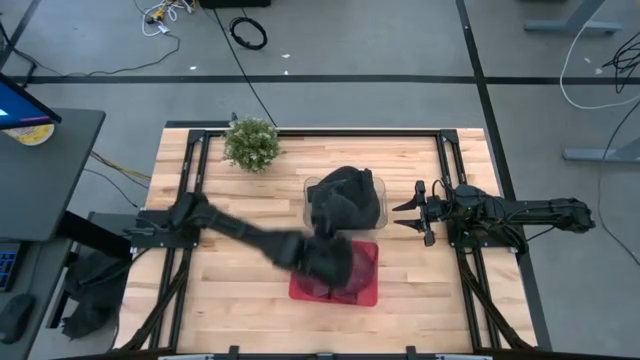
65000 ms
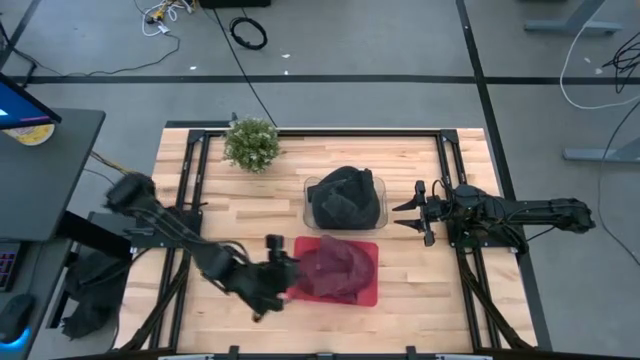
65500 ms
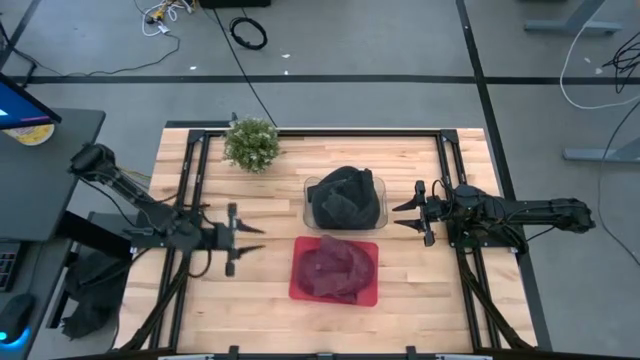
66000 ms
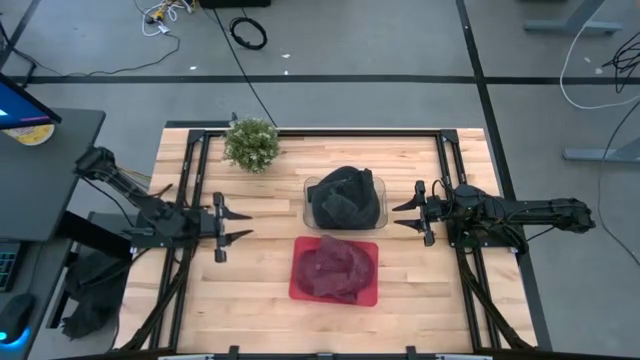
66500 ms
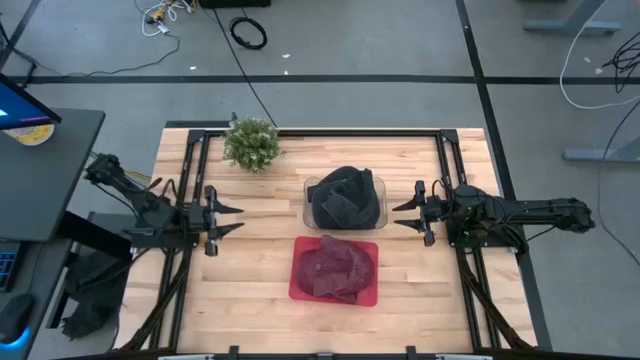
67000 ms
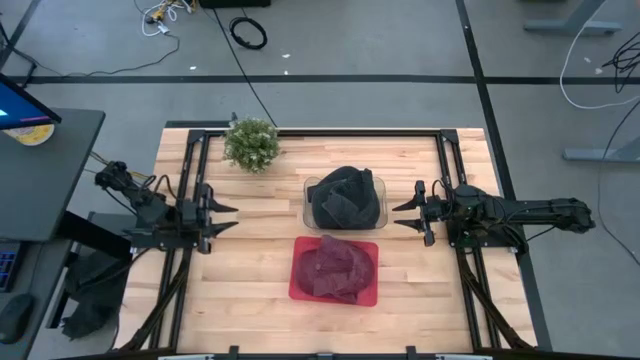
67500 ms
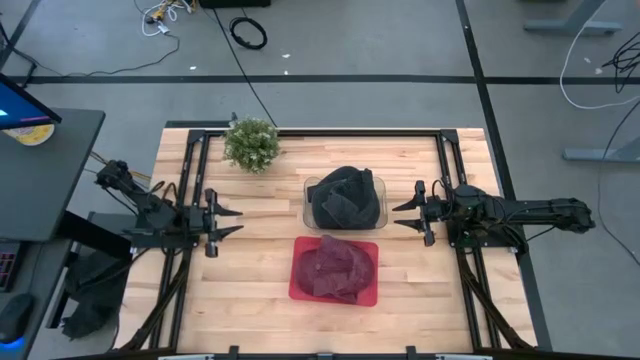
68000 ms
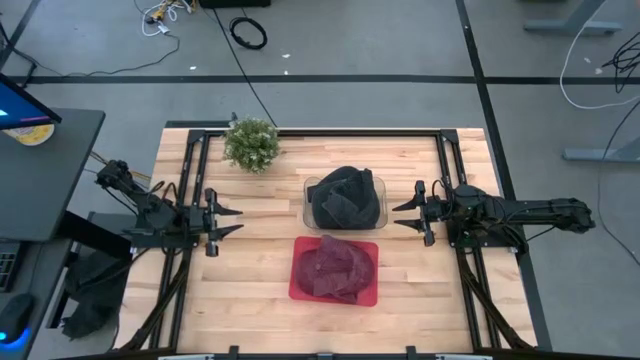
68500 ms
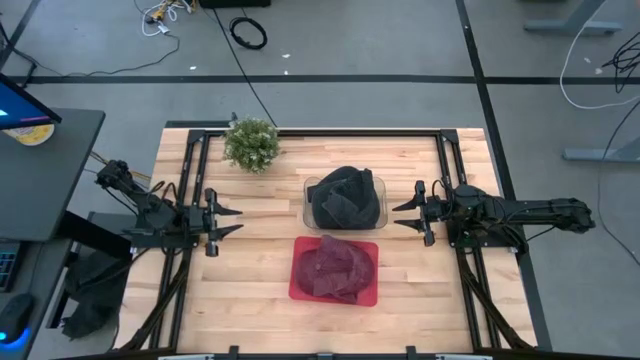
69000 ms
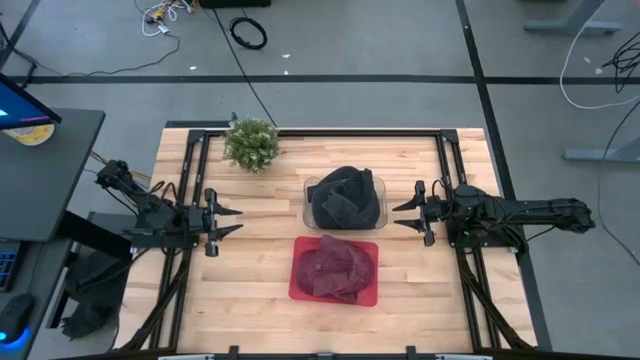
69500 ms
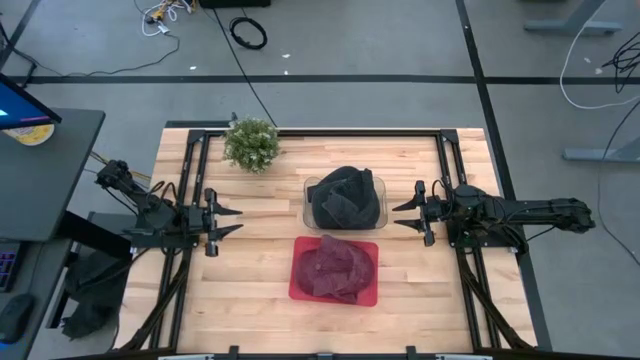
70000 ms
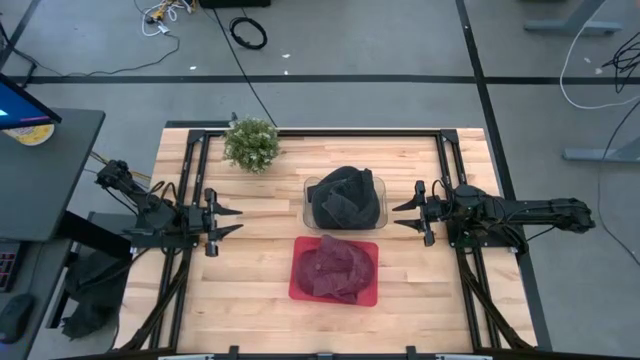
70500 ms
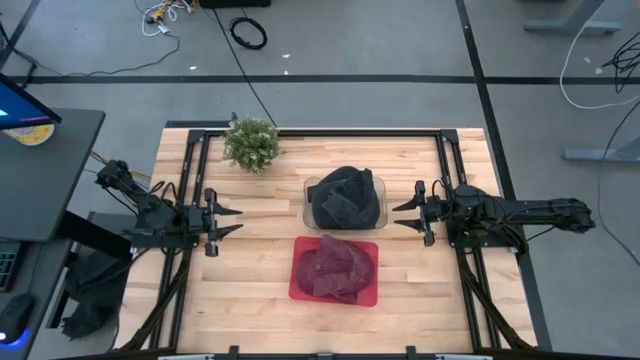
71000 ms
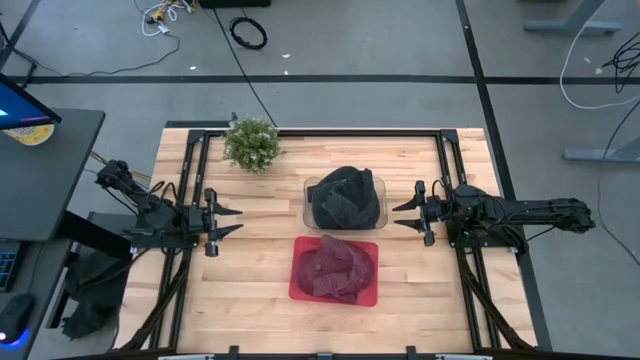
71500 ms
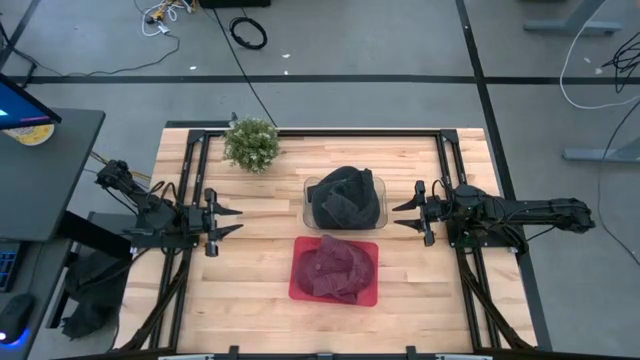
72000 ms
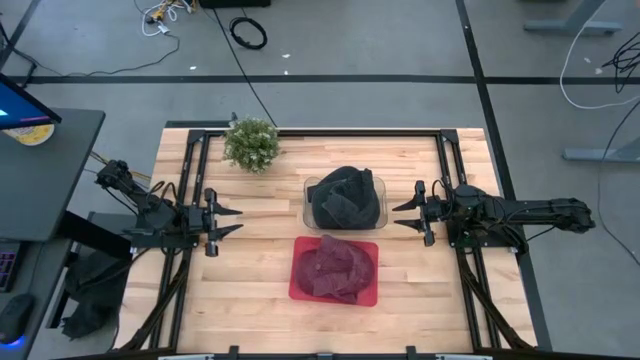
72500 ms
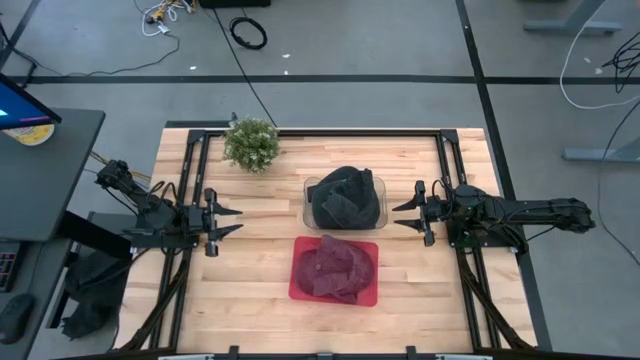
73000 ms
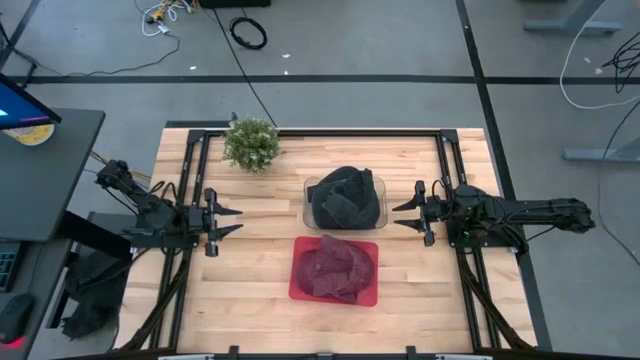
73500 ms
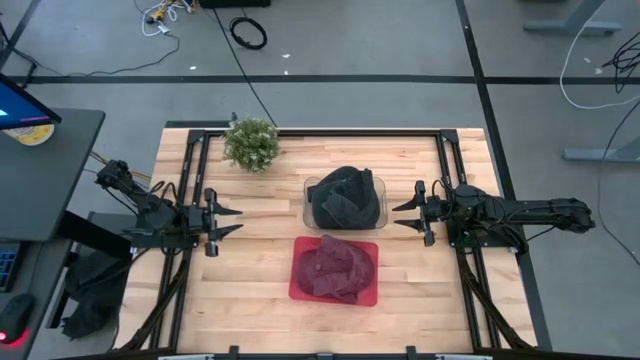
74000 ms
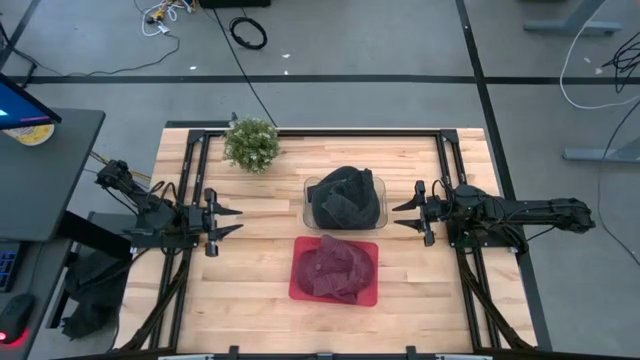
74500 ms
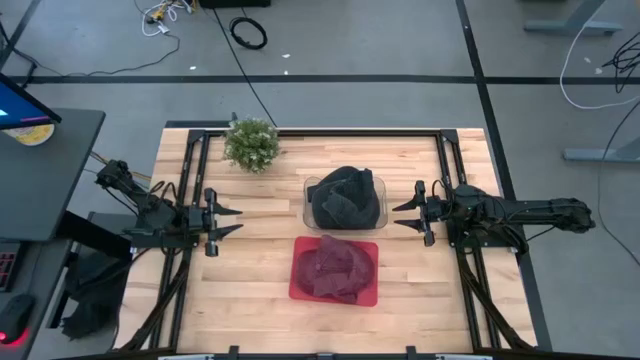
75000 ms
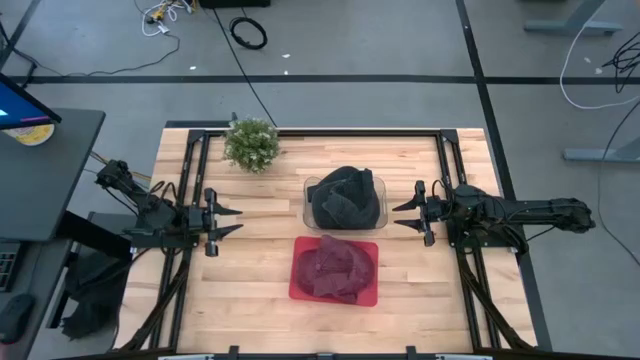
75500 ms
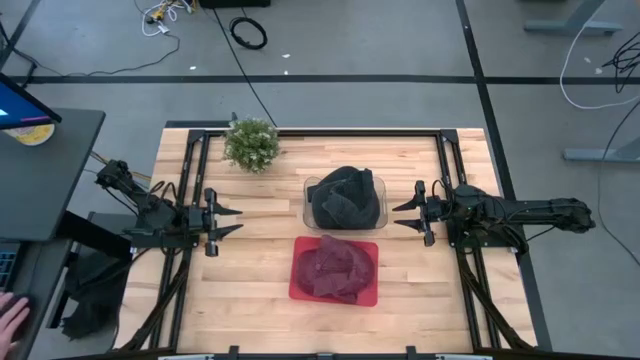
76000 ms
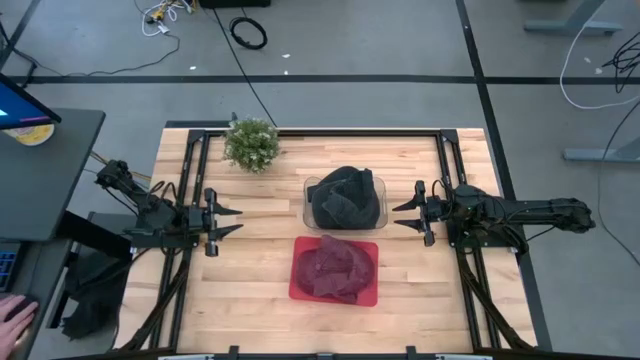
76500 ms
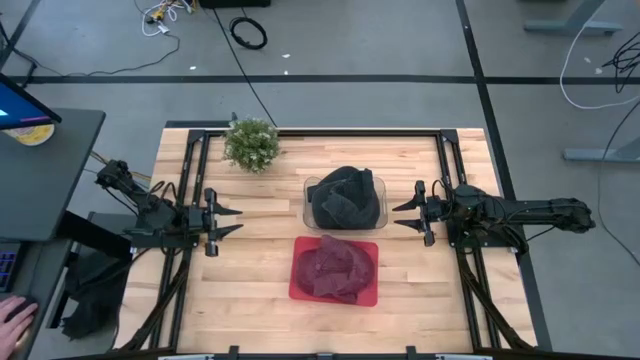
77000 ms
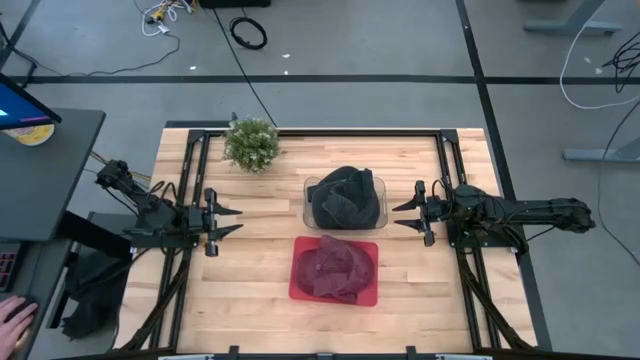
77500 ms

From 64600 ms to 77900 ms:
Task: Pick & Place hat
Return to Home Position

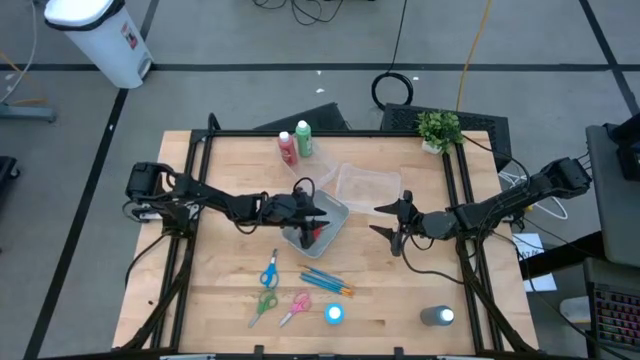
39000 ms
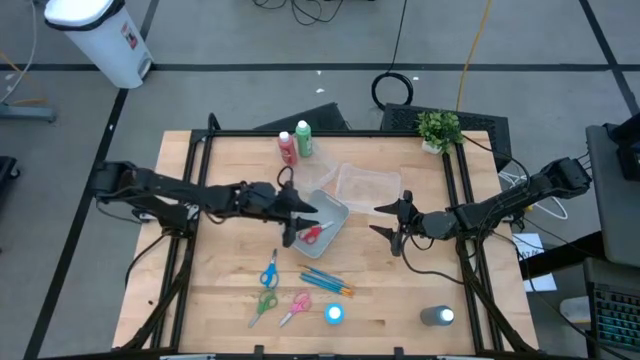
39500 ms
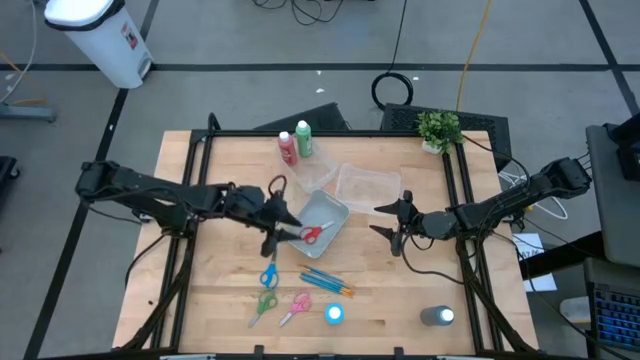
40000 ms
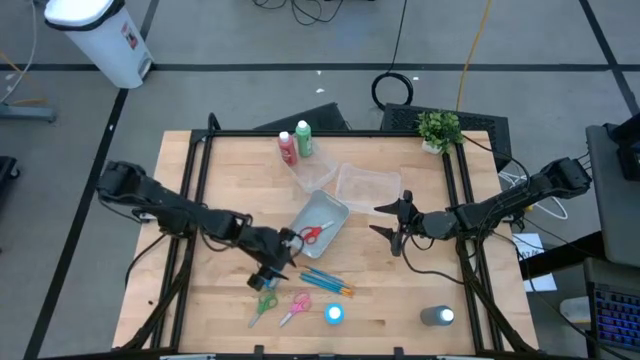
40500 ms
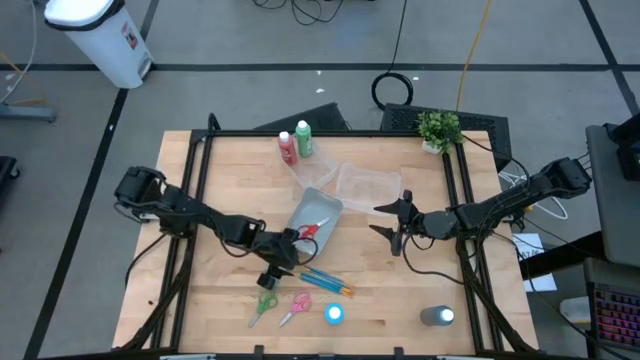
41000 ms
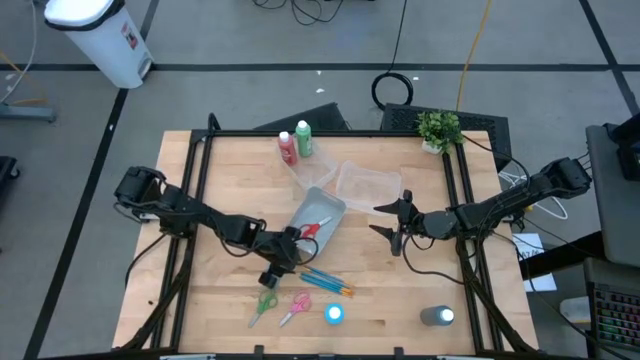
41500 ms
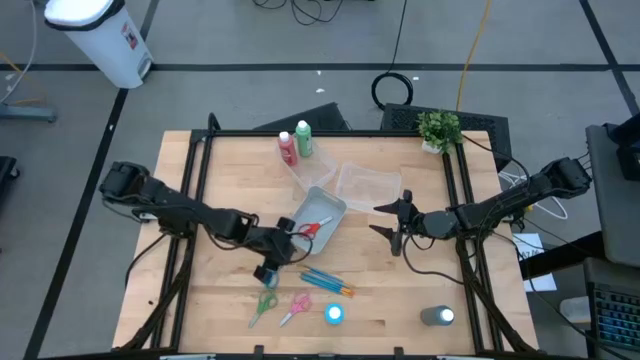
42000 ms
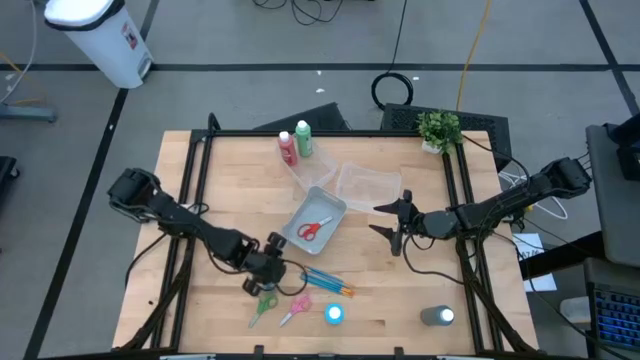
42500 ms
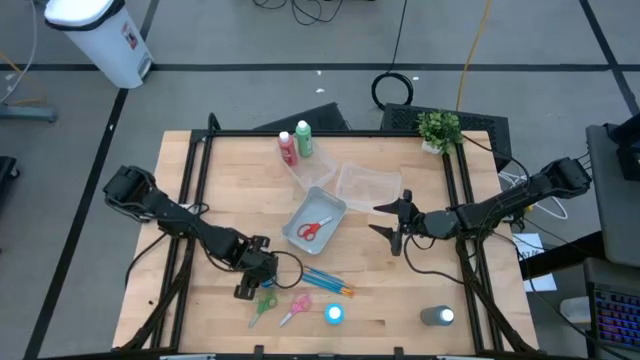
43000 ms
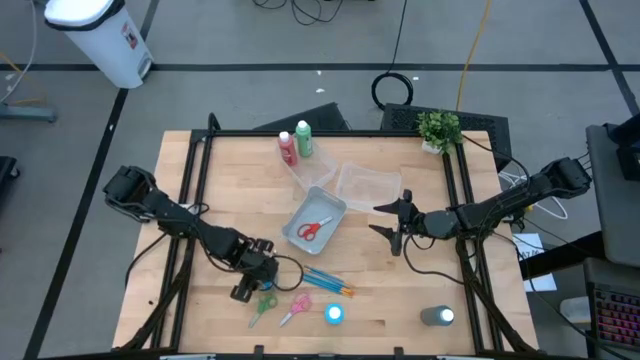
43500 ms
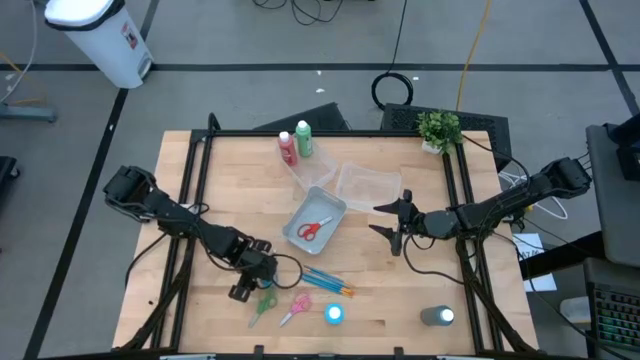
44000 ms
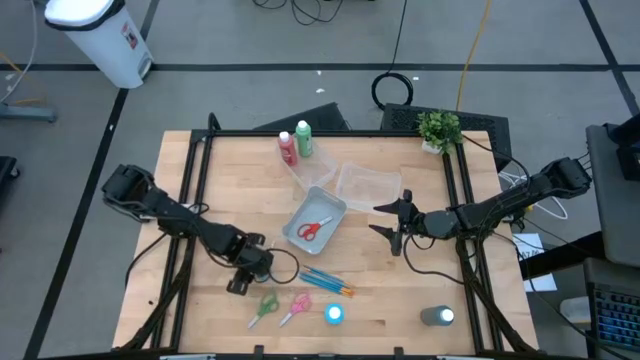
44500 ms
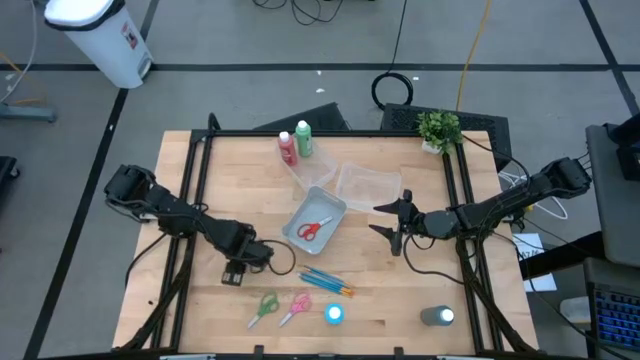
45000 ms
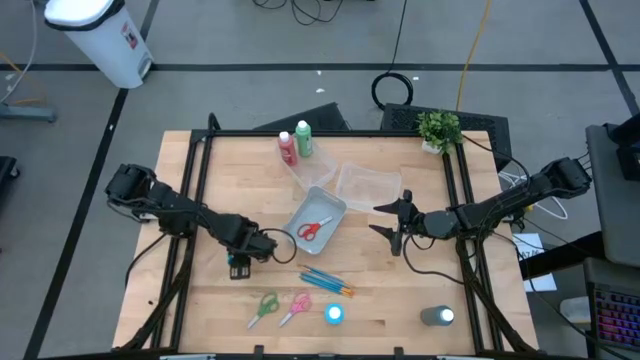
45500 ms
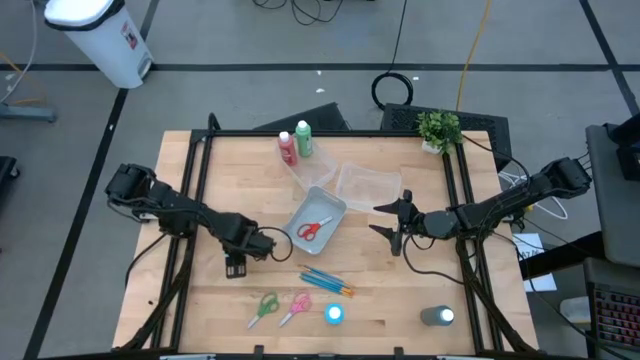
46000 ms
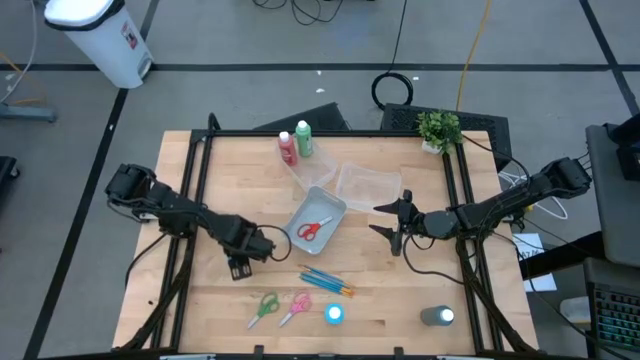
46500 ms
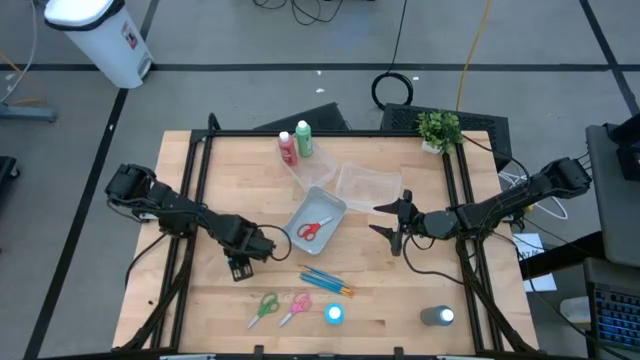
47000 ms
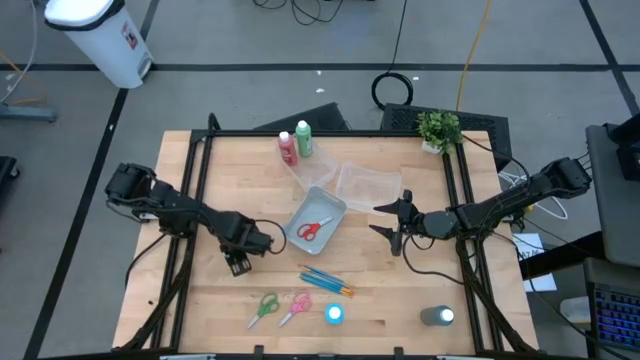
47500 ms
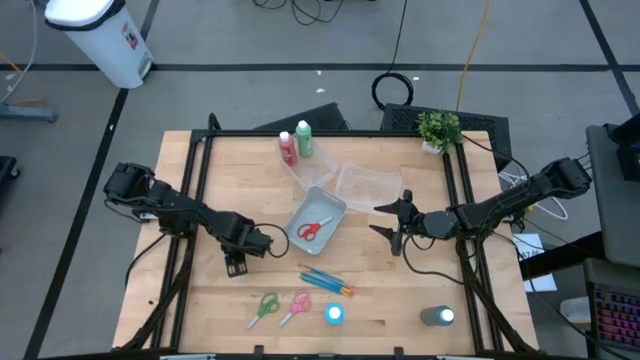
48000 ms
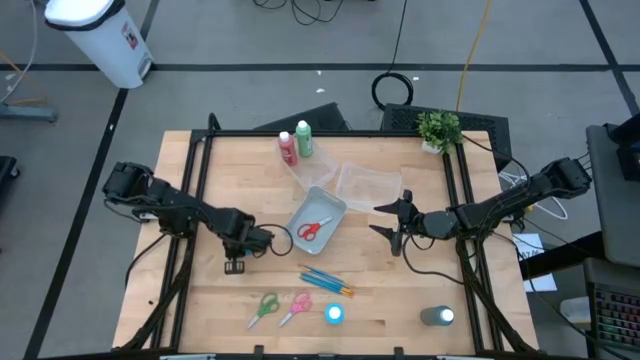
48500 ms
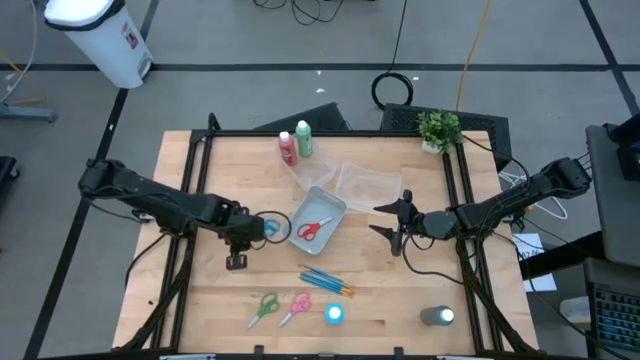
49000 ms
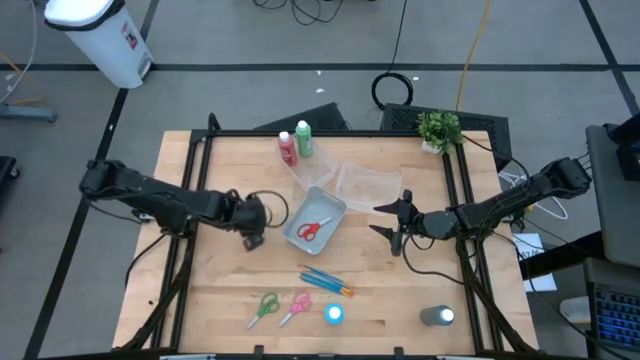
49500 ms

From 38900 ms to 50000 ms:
Task: Pick & Place Paint Supplies
Put the blue scissors into the blue bin
